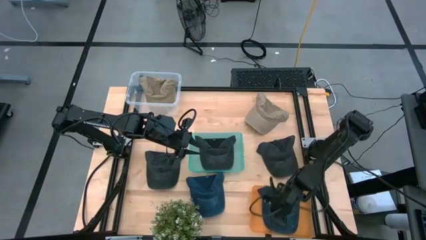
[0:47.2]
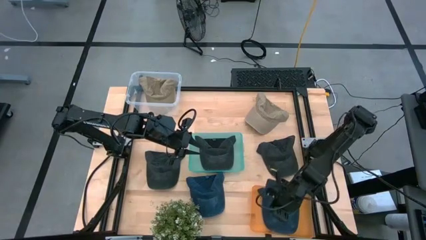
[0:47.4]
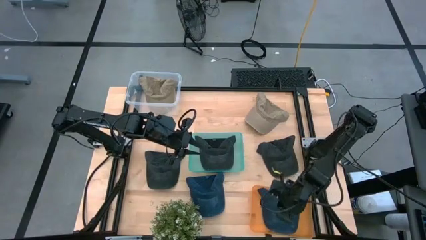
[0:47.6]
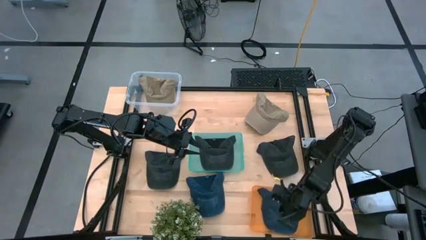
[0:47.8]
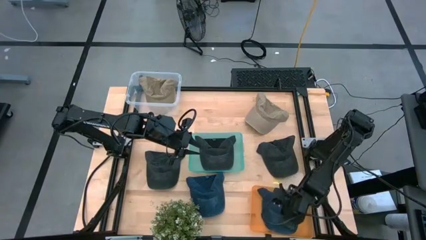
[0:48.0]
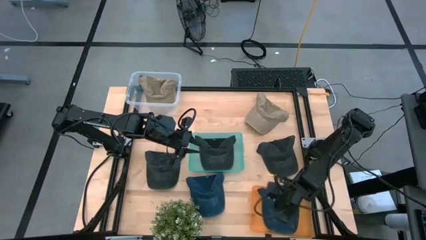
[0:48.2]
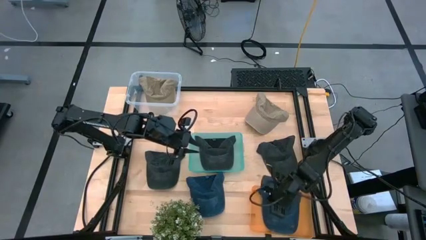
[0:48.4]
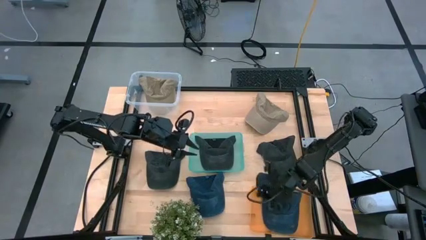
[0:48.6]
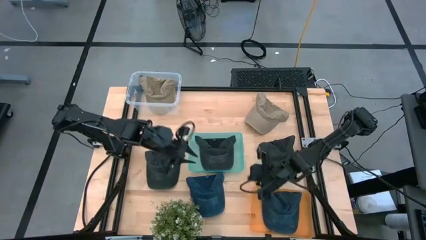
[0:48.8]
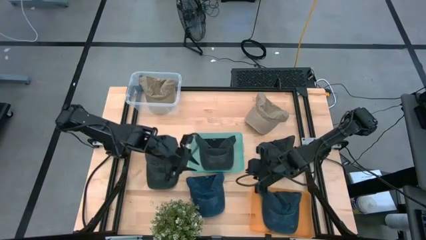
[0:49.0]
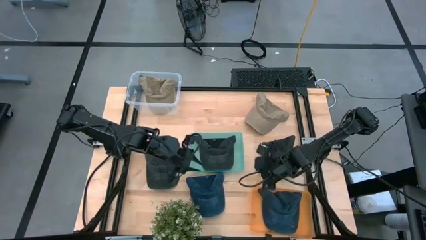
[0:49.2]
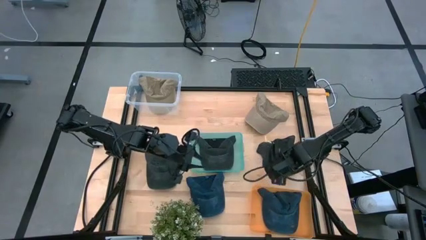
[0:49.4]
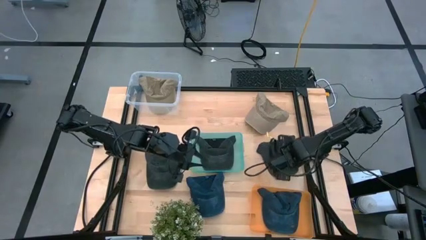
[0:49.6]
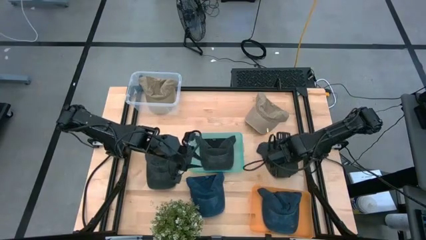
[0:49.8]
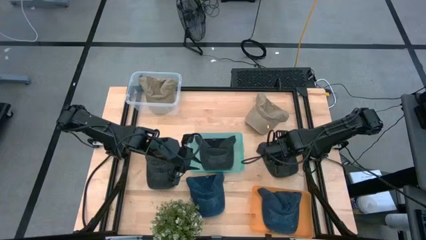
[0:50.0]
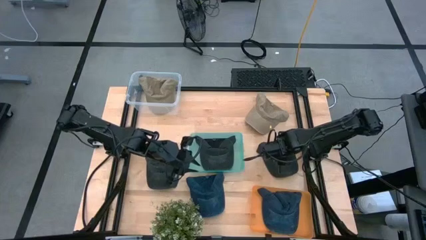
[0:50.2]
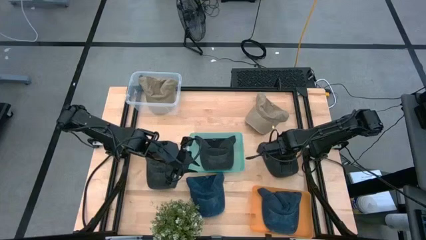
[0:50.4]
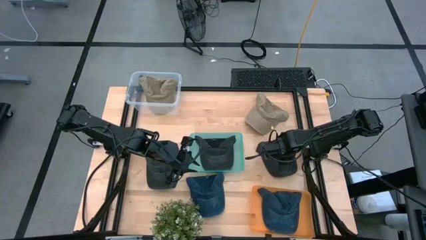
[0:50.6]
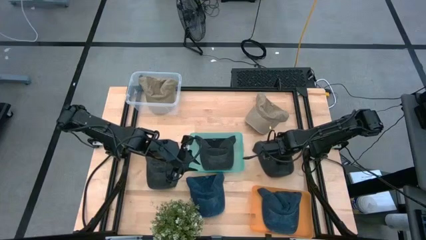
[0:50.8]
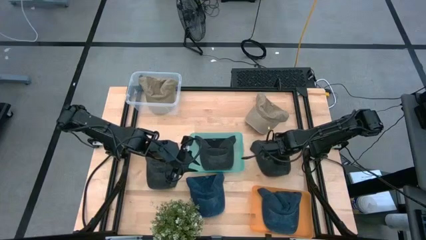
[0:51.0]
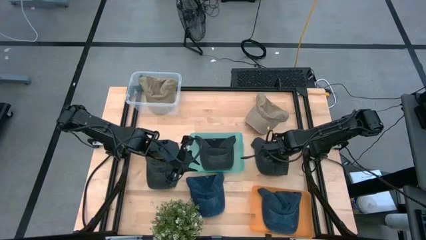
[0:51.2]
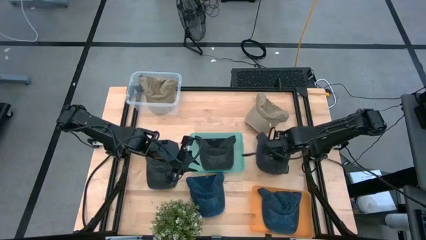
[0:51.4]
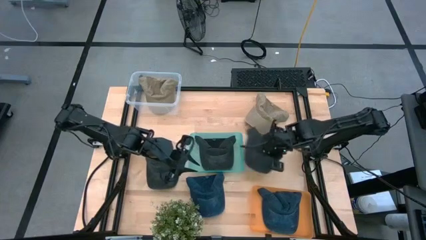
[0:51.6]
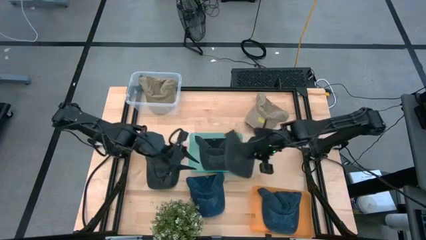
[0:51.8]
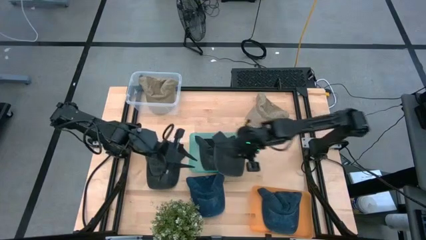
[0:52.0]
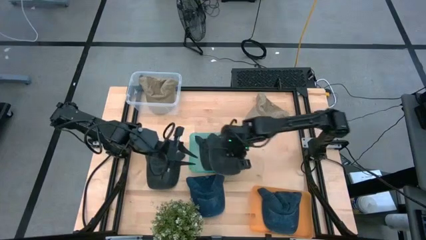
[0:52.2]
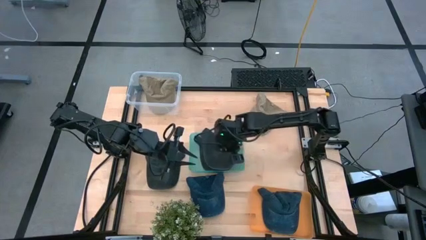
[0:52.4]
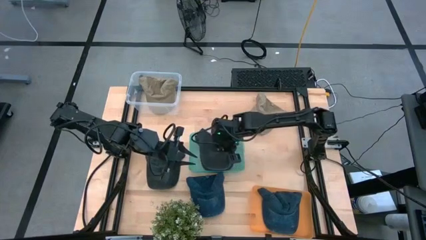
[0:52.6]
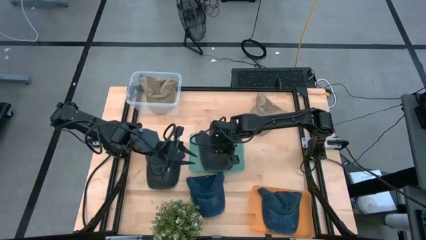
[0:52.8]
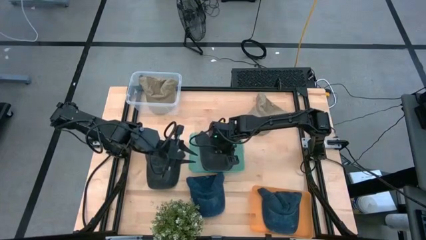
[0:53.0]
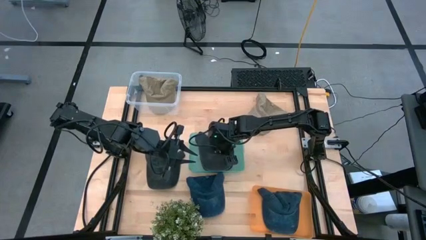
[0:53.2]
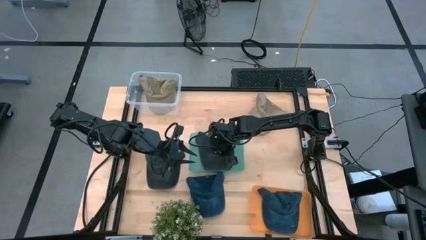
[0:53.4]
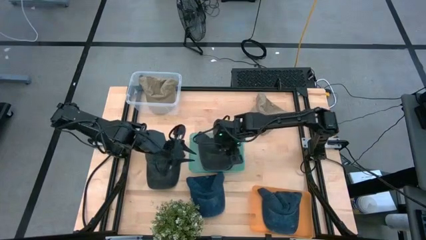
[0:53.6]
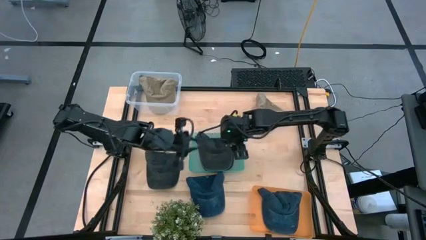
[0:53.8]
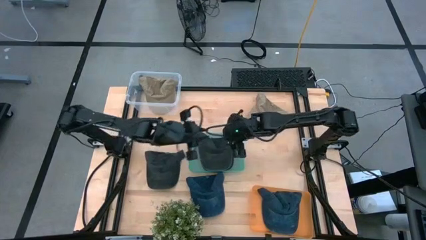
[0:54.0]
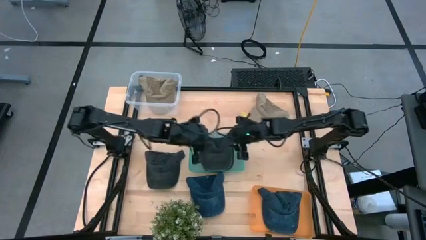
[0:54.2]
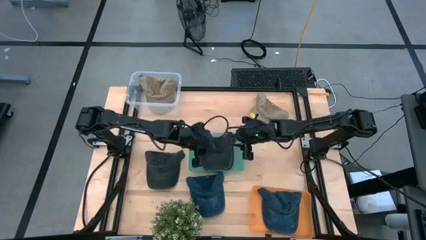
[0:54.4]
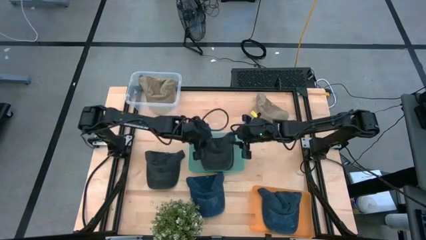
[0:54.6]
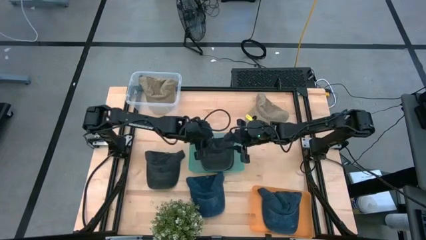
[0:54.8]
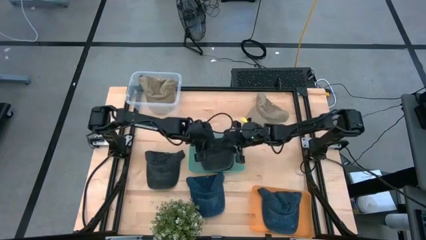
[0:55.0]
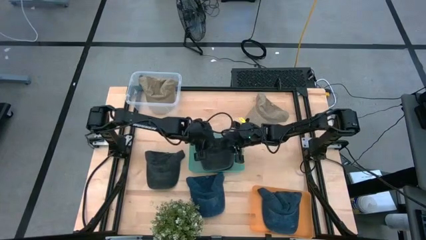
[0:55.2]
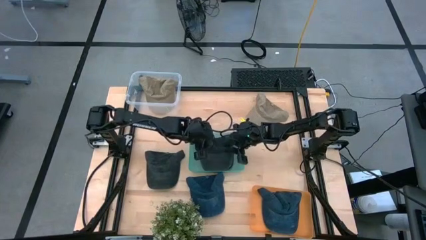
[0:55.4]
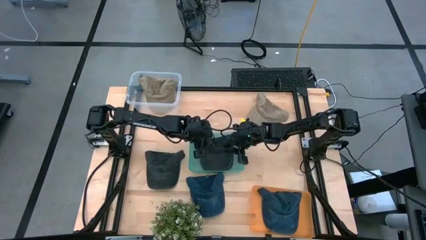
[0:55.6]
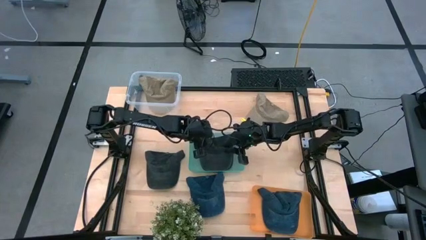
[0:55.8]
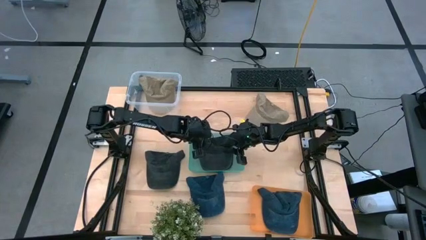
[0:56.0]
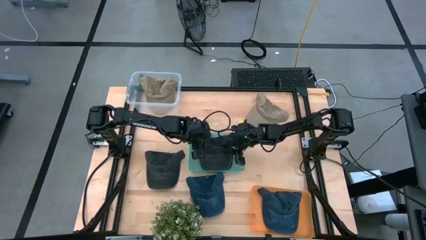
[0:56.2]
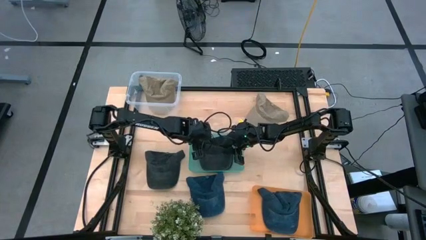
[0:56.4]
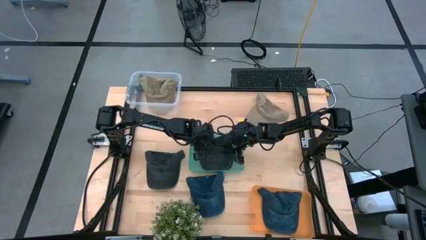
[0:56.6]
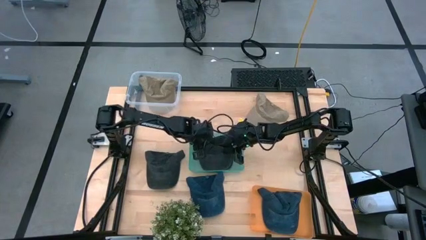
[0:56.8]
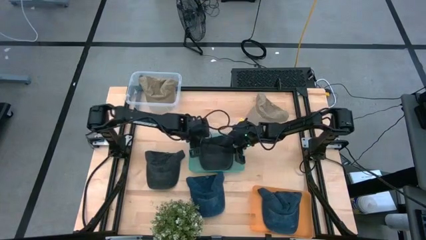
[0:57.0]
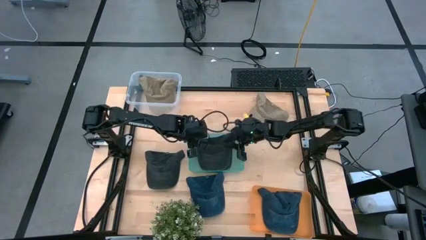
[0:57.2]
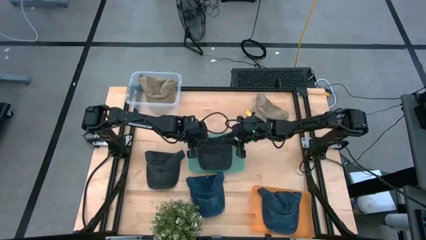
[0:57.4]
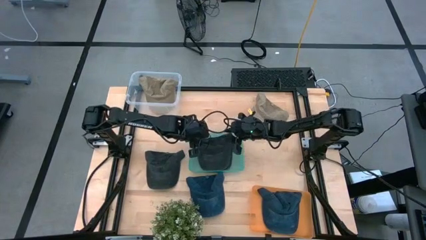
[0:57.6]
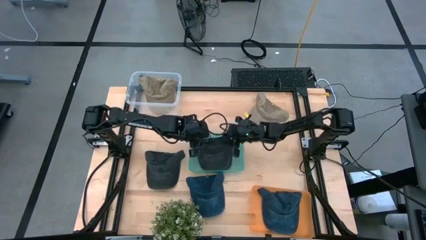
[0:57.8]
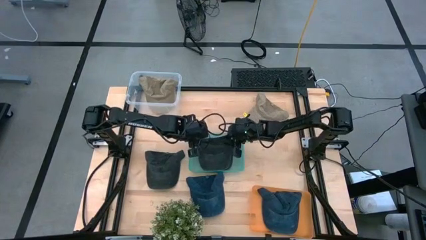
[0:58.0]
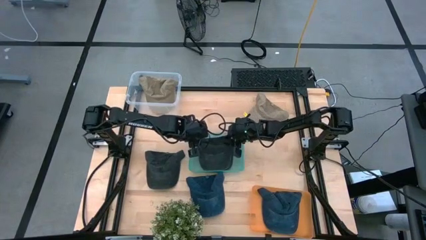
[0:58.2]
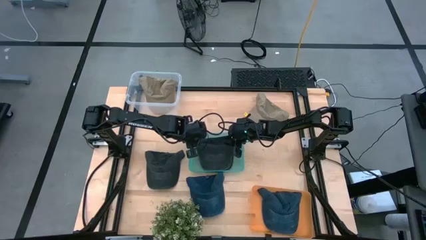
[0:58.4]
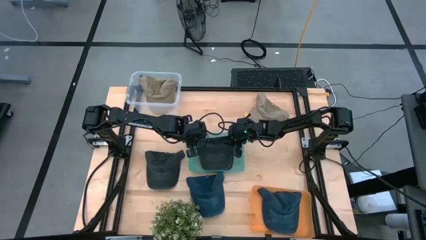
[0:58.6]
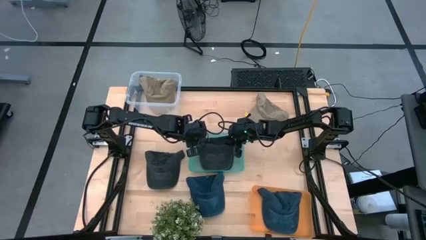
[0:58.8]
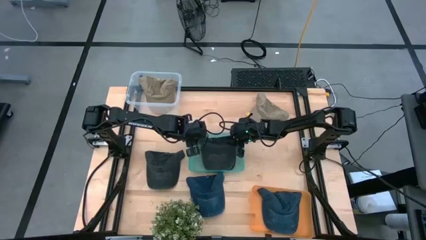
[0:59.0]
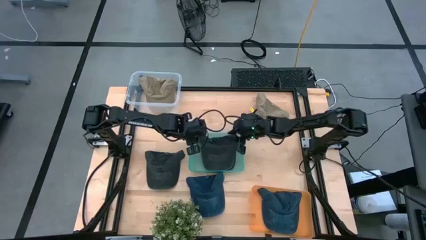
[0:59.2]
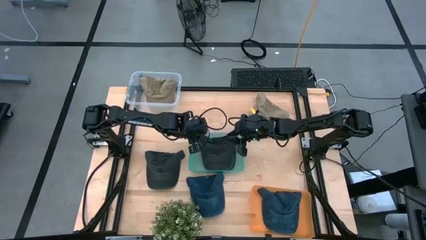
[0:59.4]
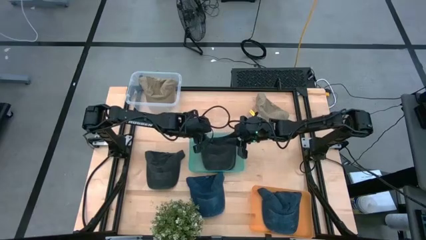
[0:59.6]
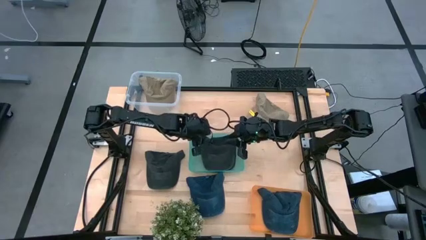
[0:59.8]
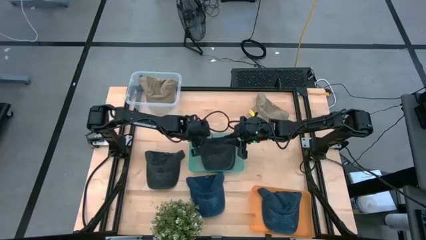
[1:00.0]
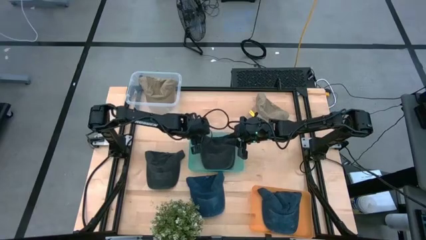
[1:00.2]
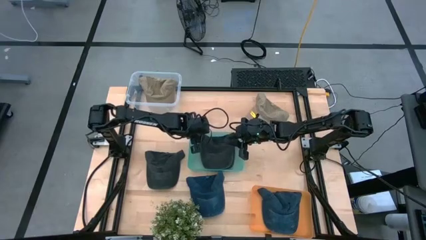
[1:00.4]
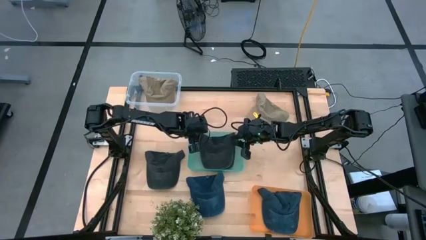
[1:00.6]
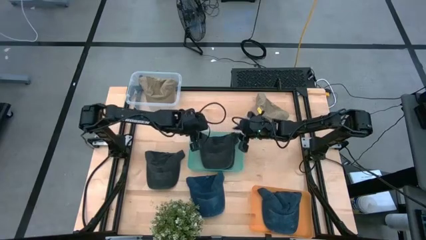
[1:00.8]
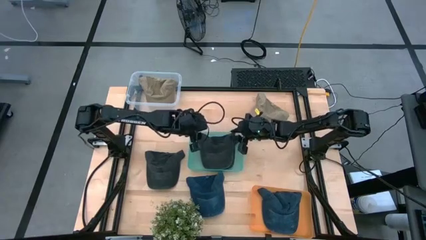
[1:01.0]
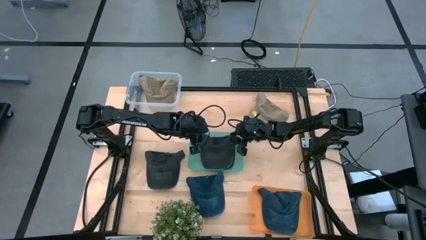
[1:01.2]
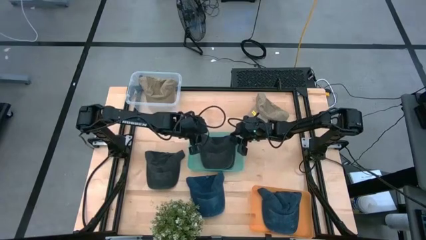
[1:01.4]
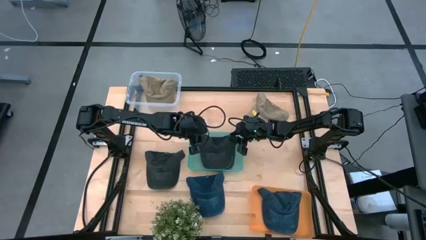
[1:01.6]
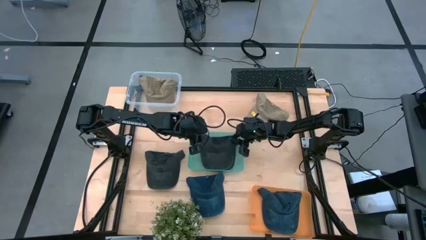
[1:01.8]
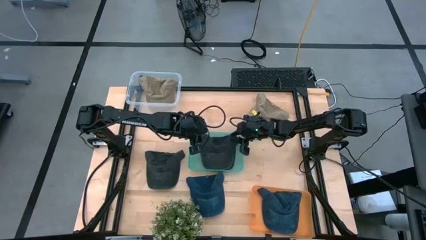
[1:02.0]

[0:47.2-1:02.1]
Task: Pick & Place hat
Put the right black cap into the green bin
